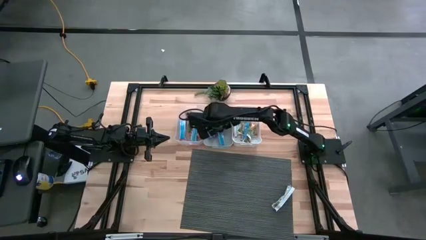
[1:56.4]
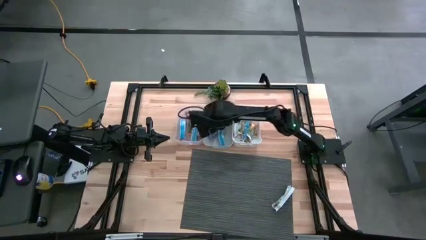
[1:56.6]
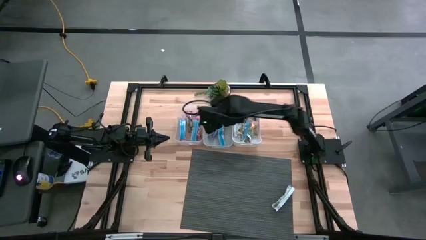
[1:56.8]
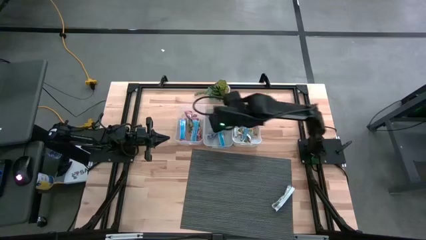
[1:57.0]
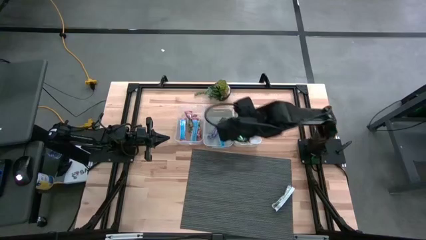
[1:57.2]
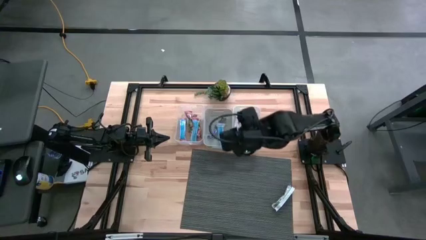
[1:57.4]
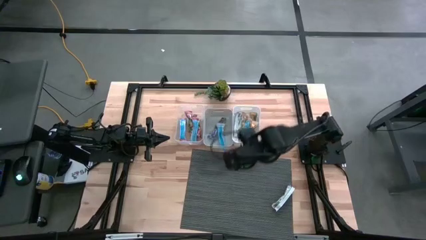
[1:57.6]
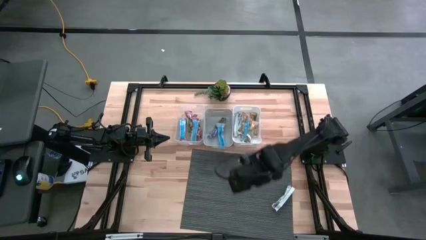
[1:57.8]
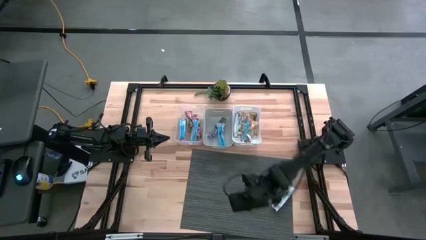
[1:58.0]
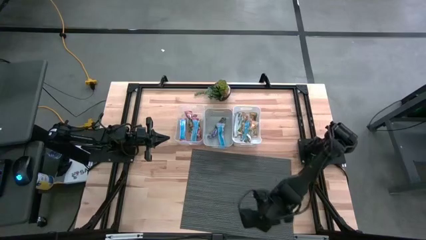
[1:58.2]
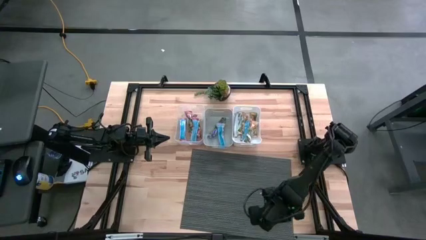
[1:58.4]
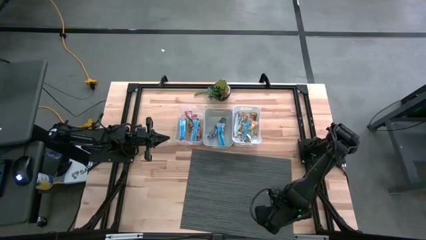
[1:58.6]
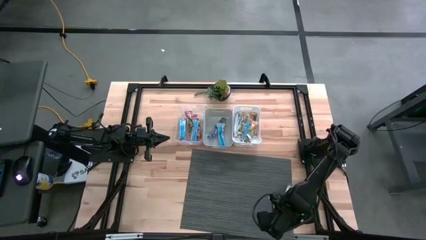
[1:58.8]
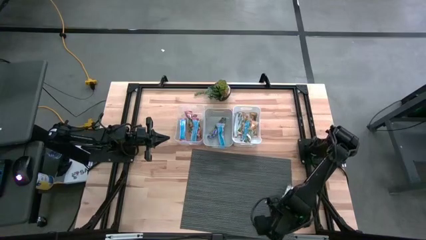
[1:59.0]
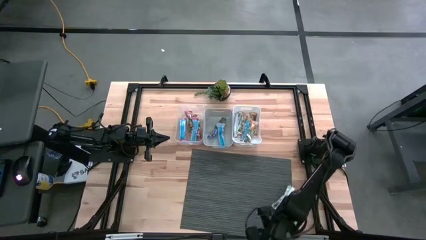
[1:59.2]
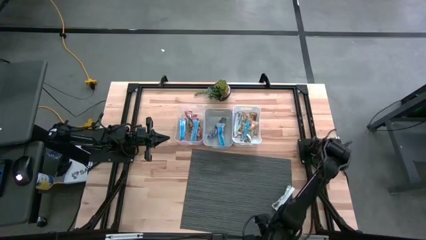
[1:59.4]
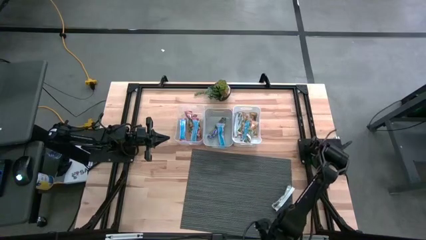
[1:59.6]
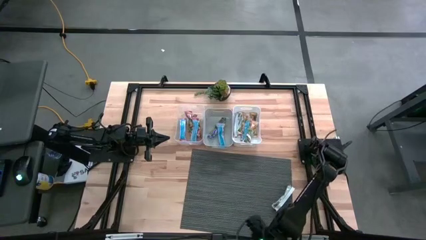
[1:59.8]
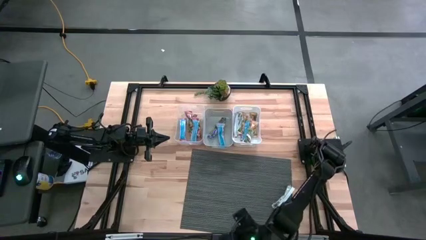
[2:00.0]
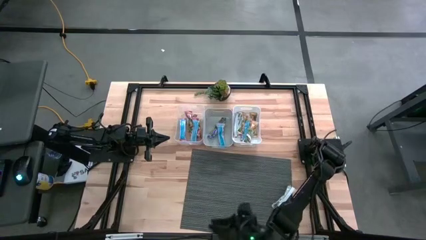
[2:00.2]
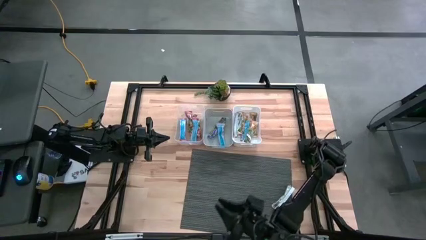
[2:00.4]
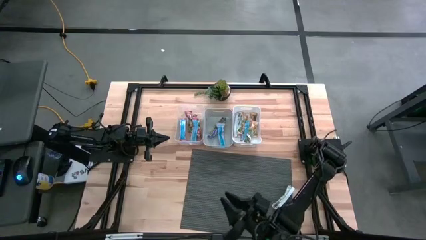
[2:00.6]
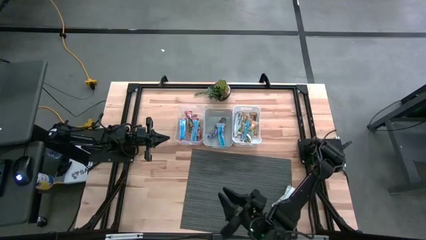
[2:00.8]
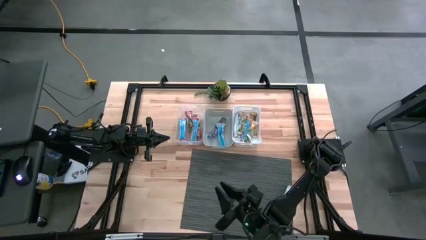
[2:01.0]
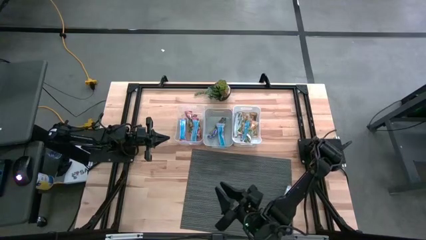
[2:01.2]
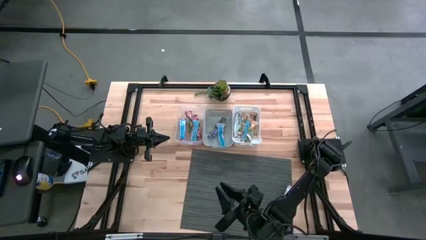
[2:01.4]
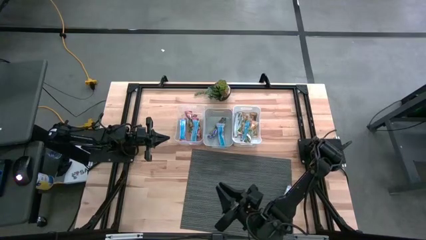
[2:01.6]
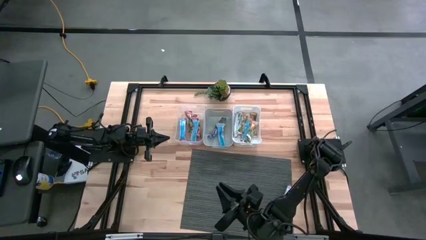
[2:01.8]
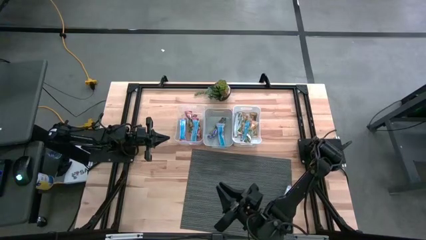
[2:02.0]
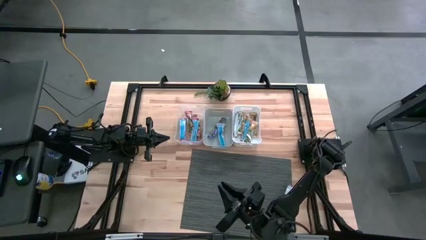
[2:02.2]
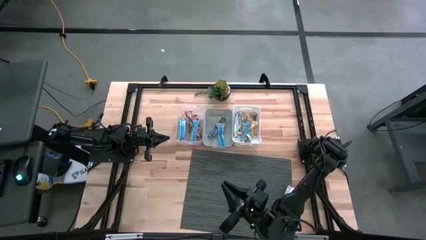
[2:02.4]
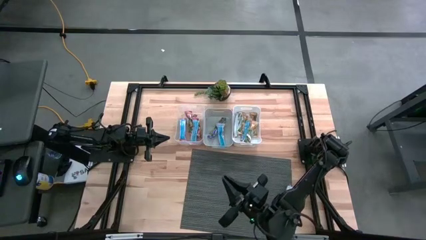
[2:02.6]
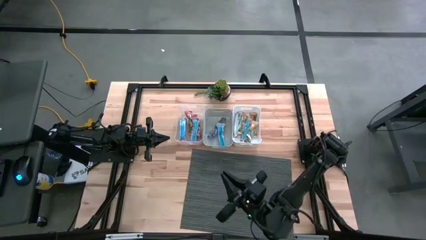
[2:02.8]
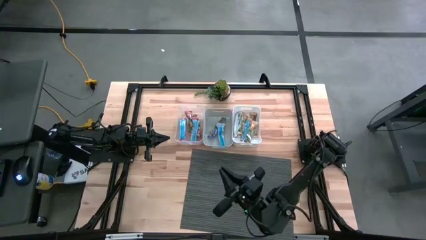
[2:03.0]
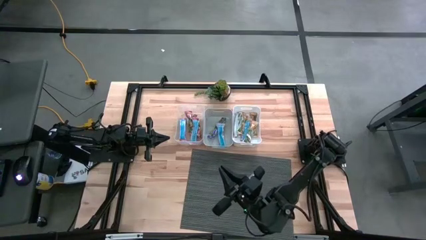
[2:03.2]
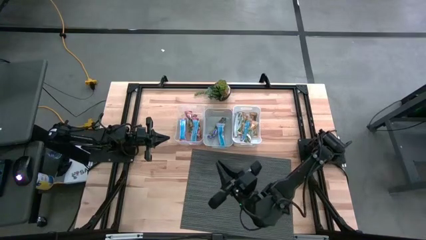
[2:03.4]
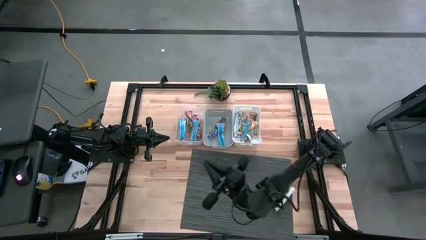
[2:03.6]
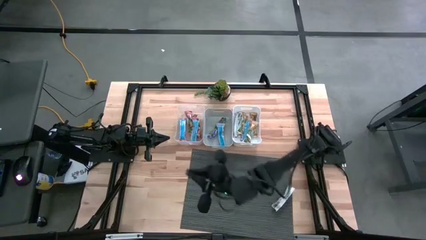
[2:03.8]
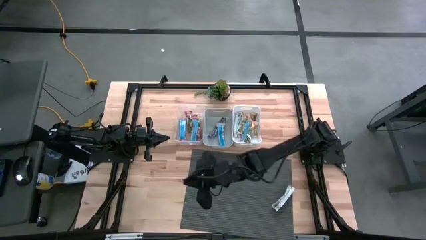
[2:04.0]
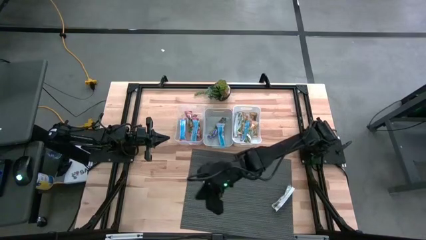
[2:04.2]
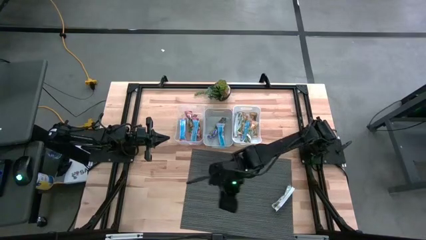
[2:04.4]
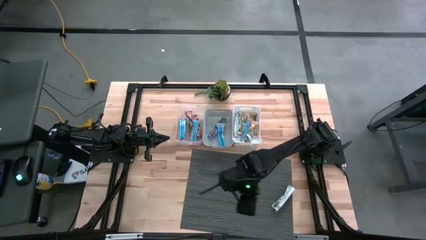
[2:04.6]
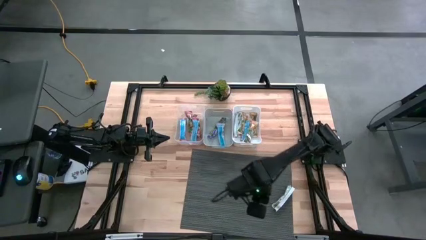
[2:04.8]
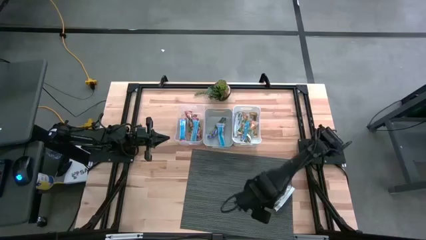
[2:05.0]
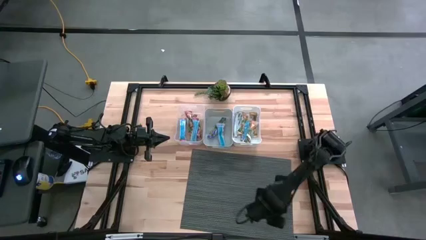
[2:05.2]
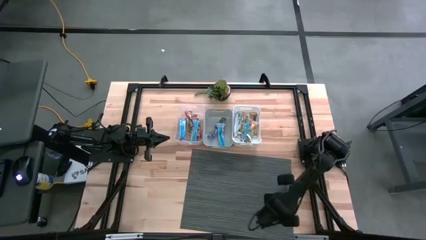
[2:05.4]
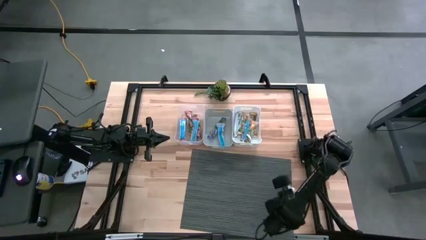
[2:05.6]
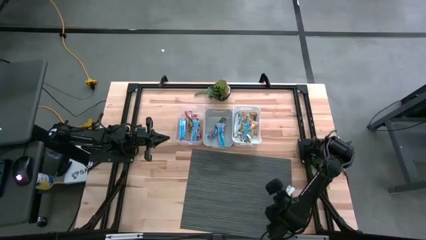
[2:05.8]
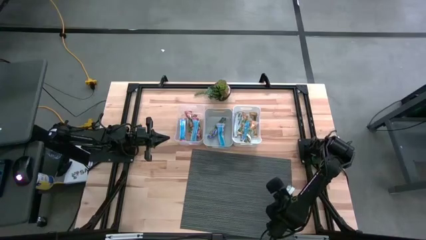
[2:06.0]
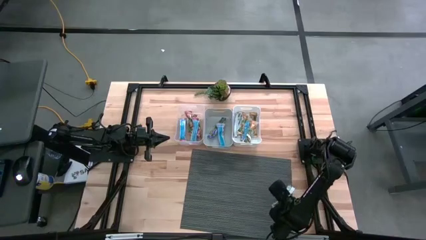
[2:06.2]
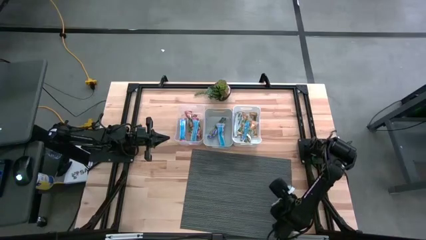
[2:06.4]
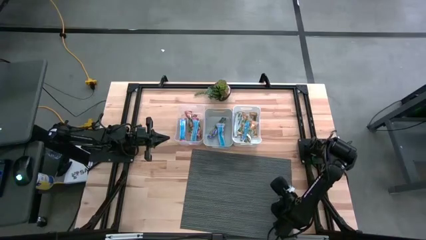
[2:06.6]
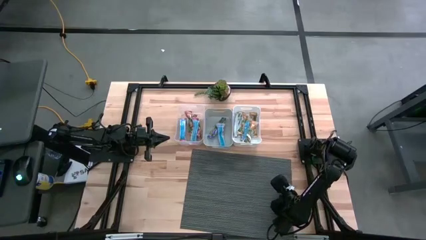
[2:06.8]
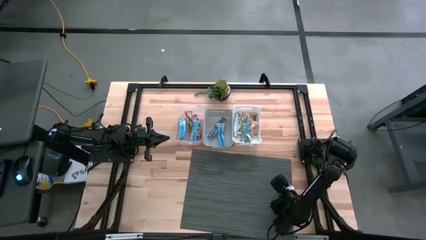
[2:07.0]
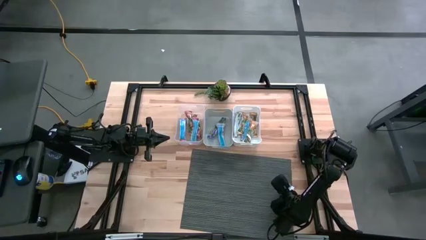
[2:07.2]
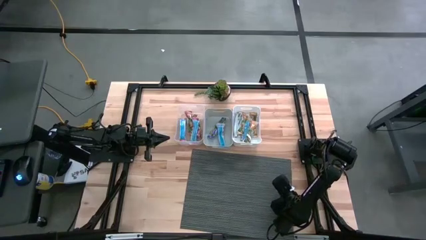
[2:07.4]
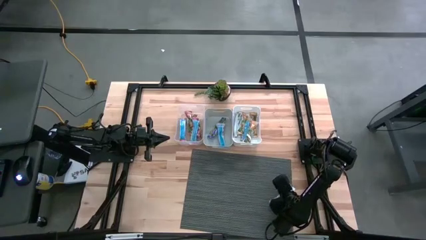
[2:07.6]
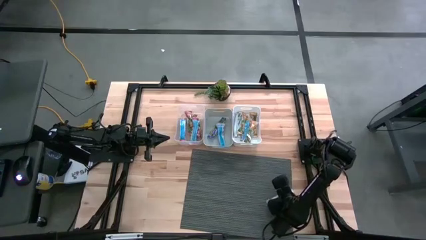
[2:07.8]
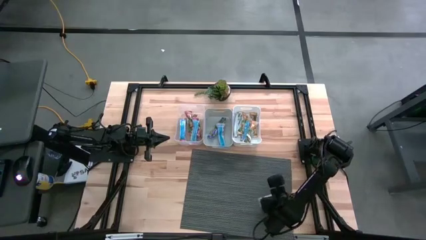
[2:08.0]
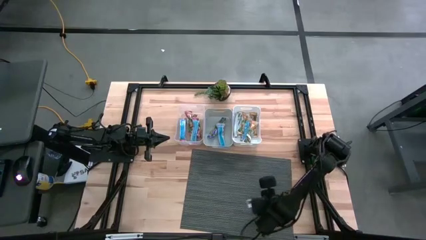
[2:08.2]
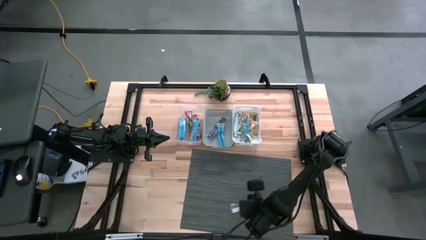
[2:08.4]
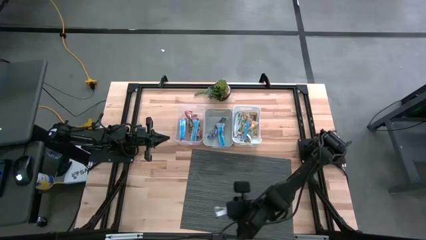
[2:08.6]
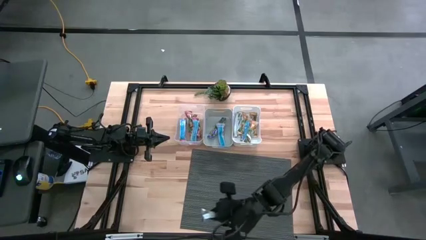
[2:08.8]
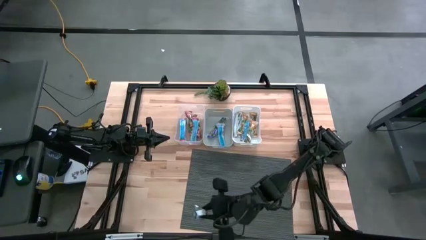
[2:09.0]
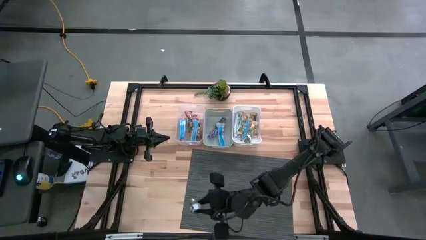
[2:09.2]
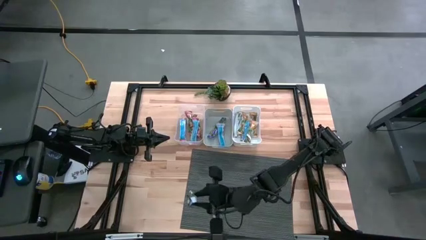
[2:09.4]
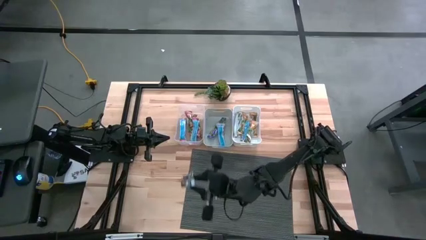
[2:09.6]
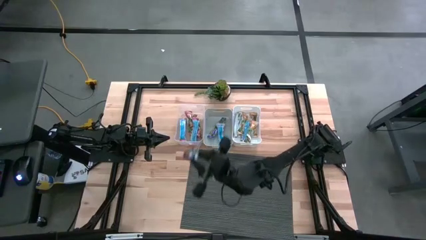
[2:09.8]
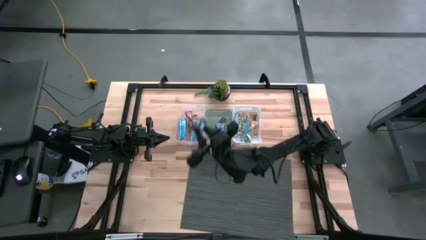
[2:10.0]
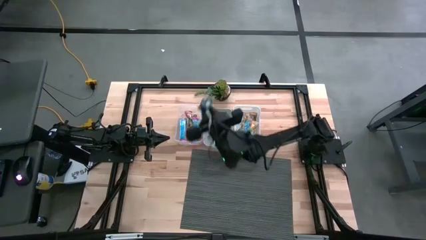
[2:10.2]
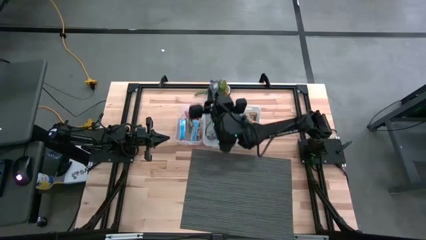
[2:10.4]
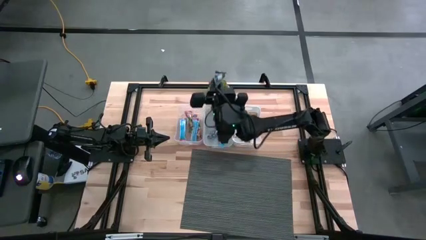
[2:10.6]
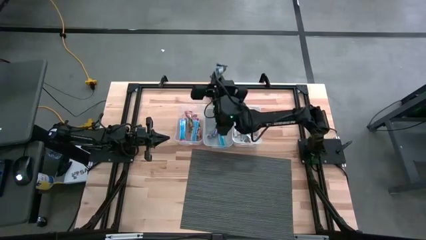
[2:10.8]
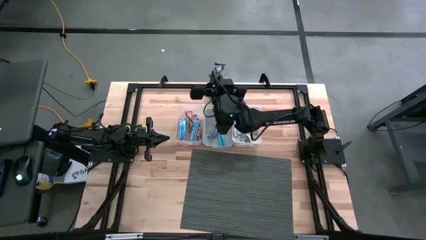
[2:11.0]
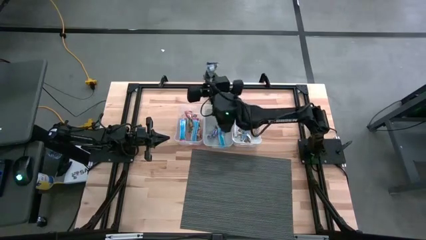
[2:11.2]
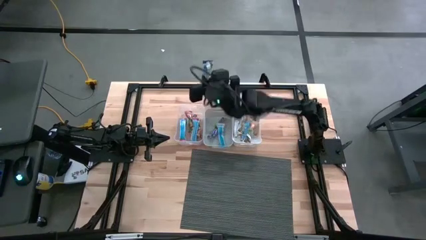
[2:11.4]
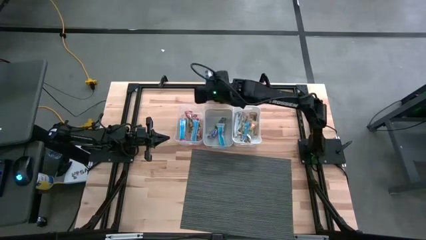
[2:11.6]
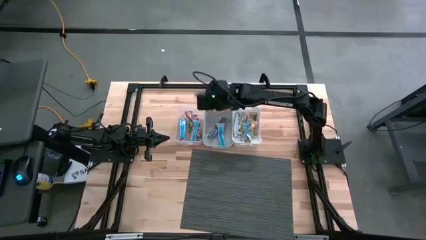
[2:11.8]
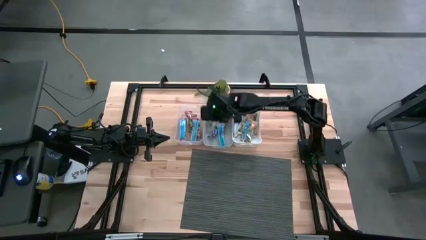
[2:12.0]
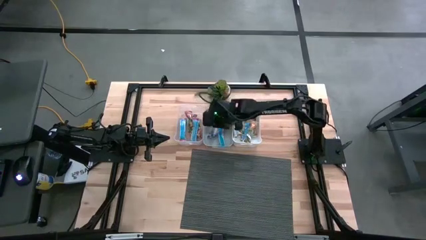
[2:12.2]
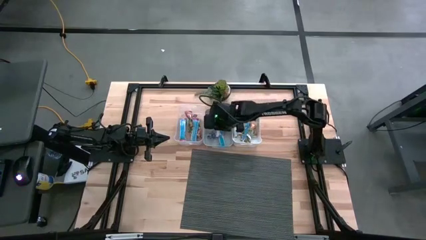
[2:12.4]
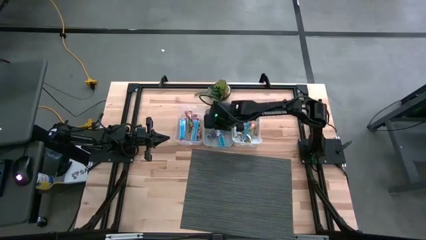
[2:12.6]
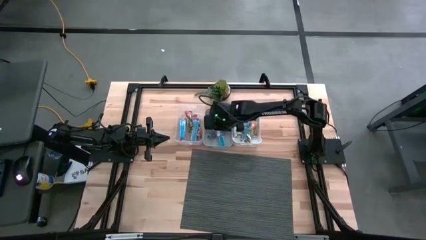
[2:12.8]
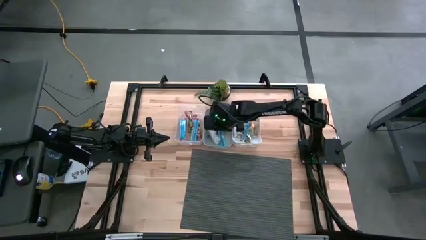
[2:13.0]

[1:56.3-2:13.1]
Task: Pick and place Granola Bars by type
Put the blue granola bar into the gray bin
